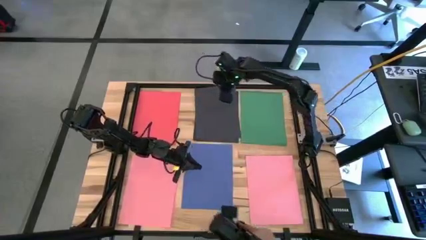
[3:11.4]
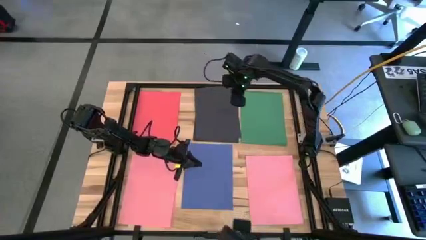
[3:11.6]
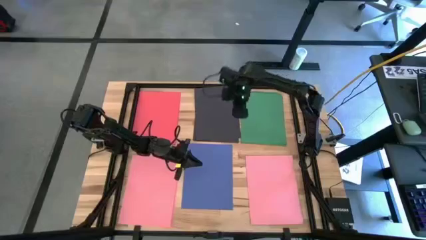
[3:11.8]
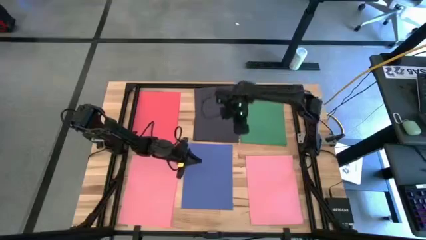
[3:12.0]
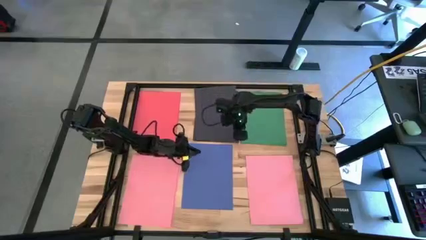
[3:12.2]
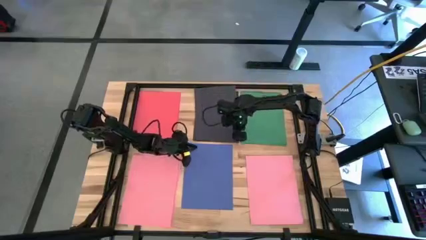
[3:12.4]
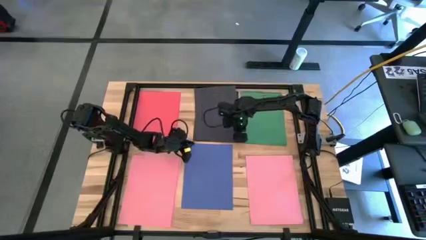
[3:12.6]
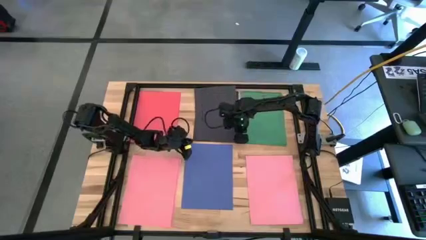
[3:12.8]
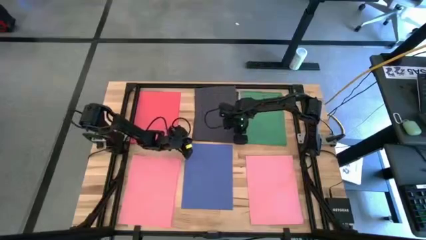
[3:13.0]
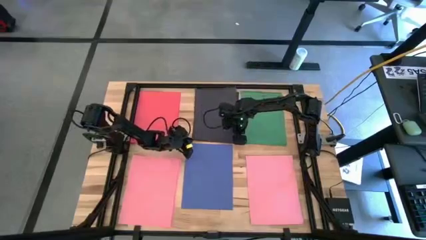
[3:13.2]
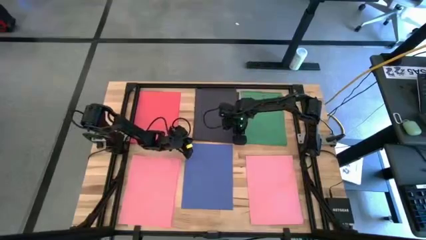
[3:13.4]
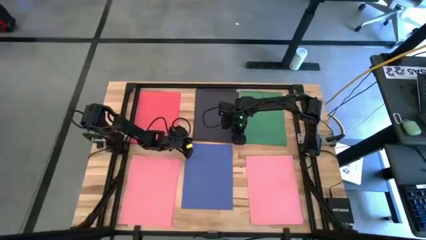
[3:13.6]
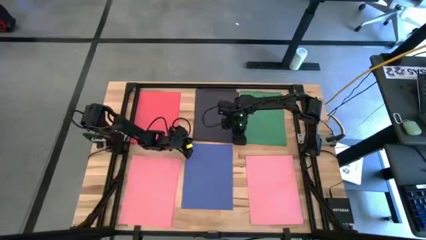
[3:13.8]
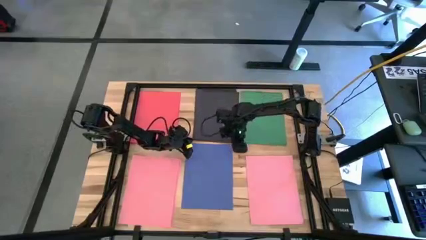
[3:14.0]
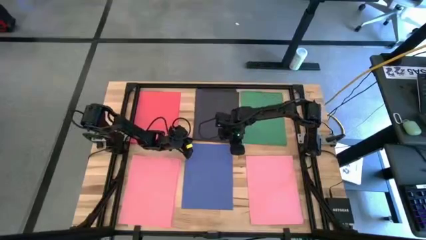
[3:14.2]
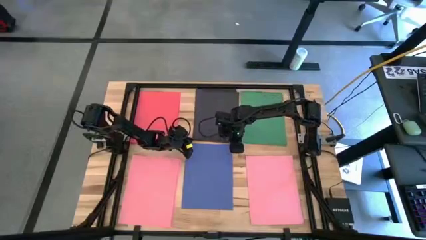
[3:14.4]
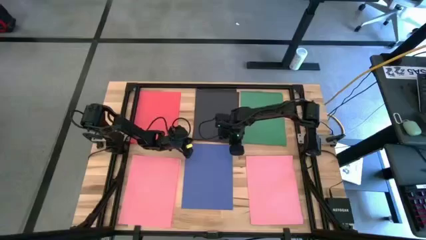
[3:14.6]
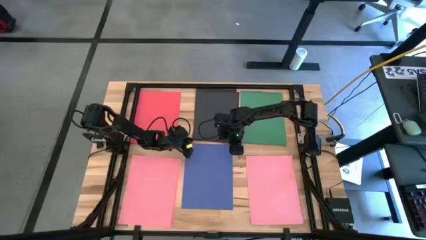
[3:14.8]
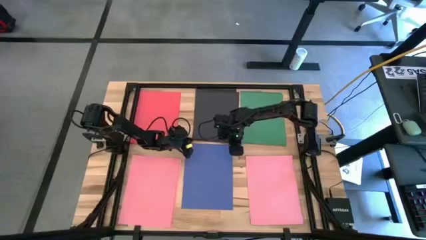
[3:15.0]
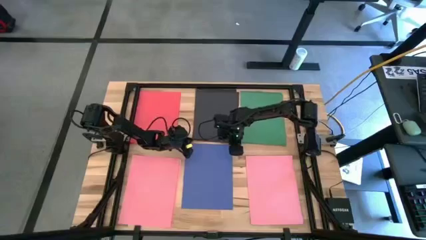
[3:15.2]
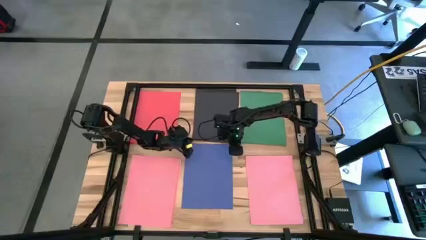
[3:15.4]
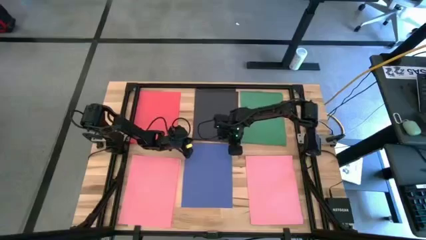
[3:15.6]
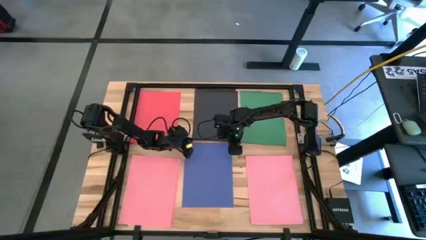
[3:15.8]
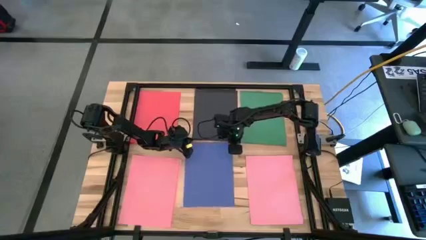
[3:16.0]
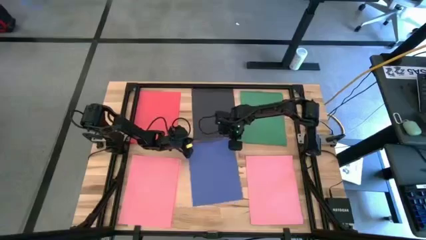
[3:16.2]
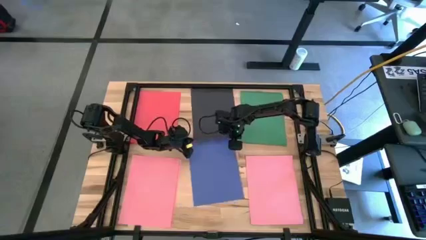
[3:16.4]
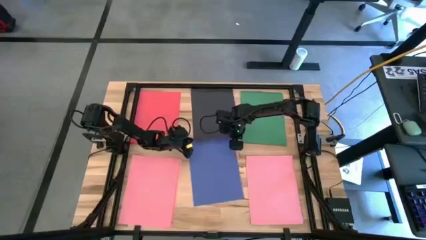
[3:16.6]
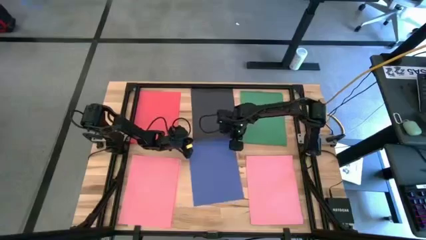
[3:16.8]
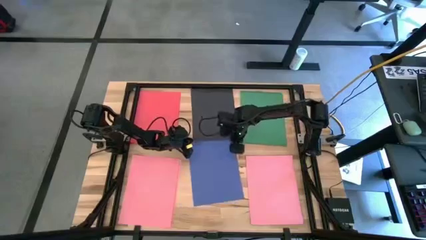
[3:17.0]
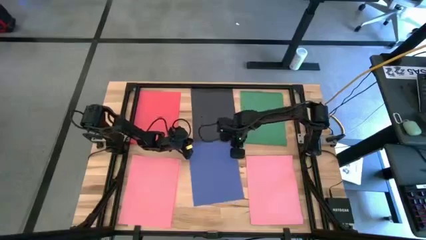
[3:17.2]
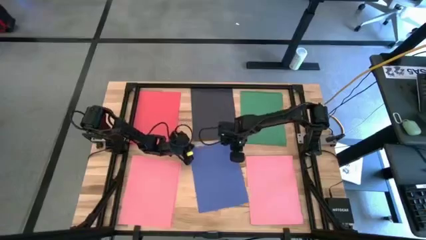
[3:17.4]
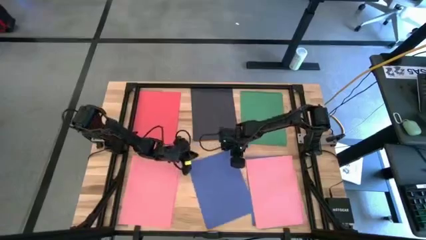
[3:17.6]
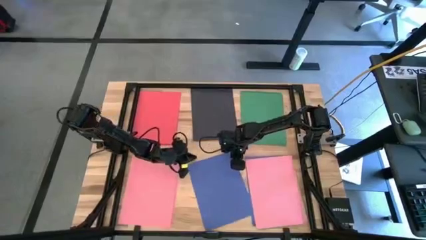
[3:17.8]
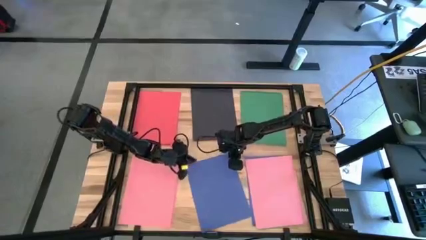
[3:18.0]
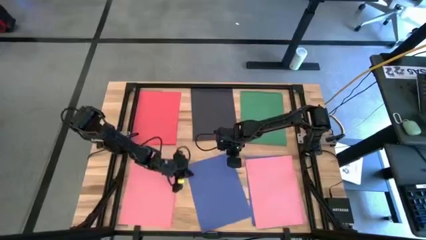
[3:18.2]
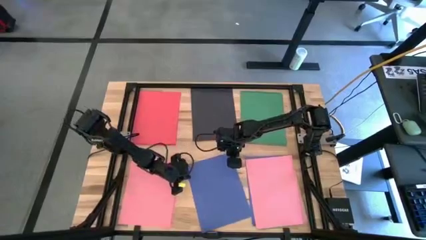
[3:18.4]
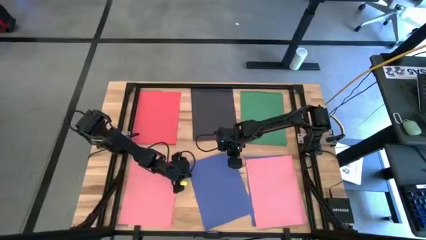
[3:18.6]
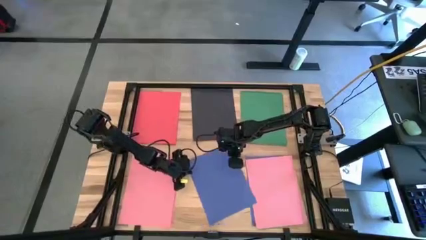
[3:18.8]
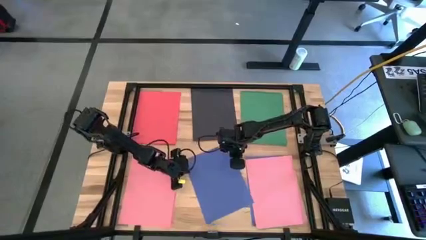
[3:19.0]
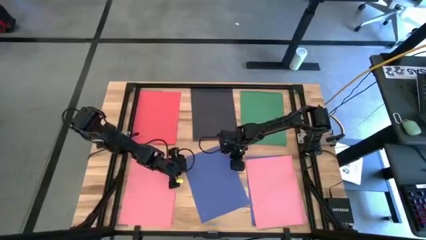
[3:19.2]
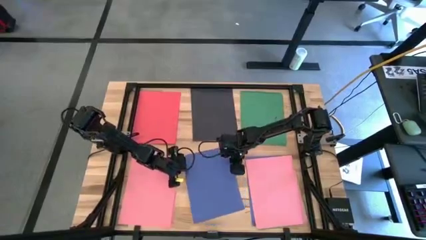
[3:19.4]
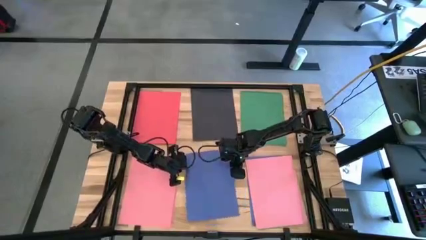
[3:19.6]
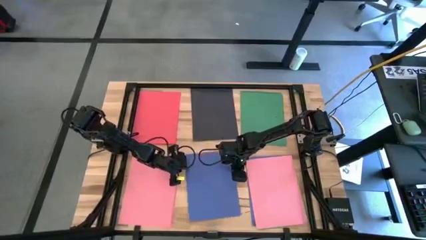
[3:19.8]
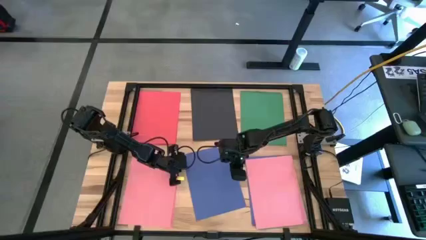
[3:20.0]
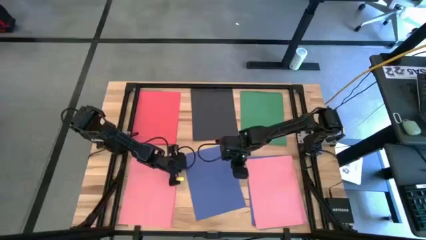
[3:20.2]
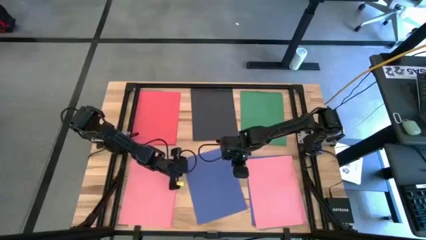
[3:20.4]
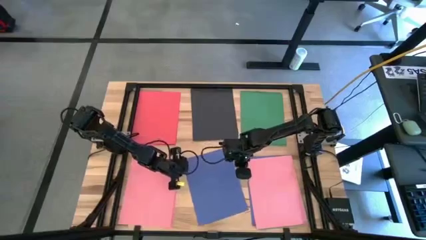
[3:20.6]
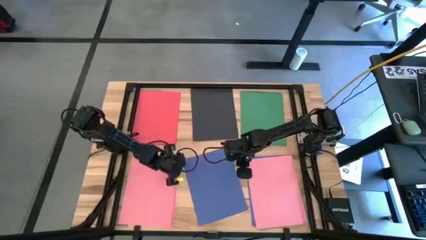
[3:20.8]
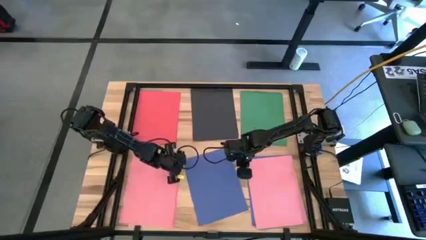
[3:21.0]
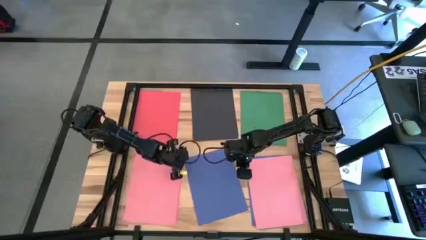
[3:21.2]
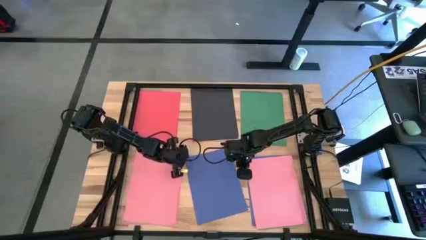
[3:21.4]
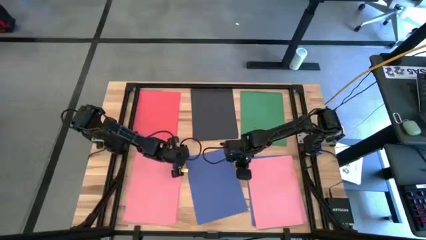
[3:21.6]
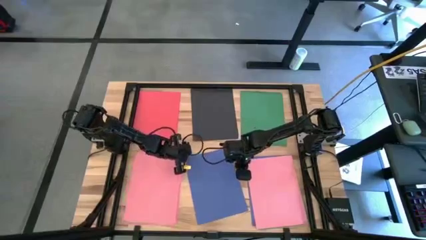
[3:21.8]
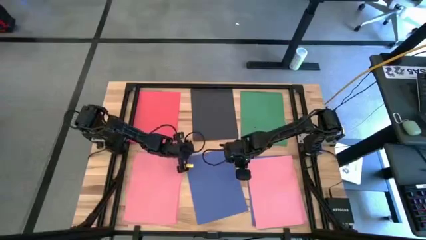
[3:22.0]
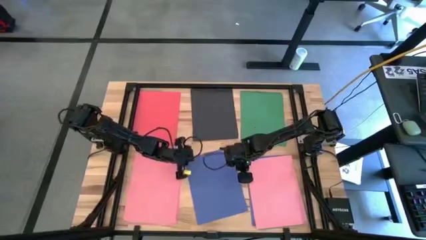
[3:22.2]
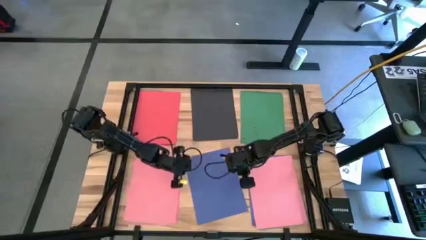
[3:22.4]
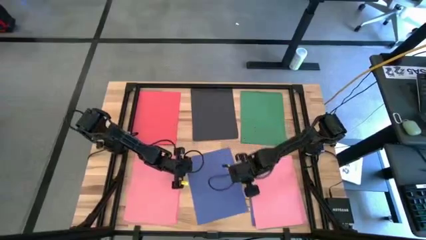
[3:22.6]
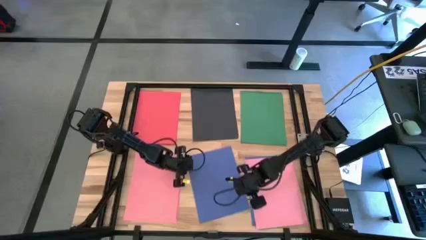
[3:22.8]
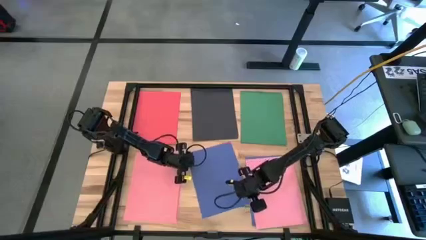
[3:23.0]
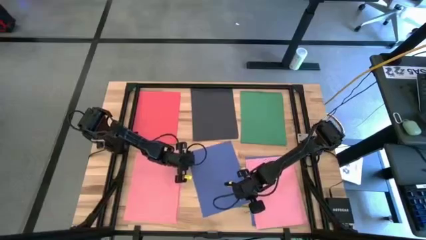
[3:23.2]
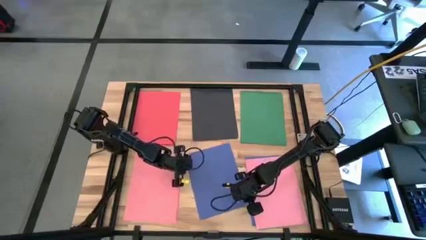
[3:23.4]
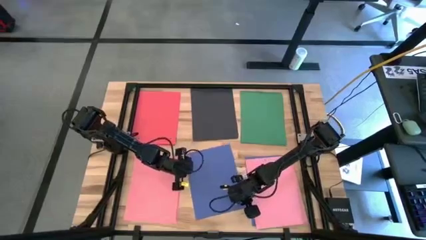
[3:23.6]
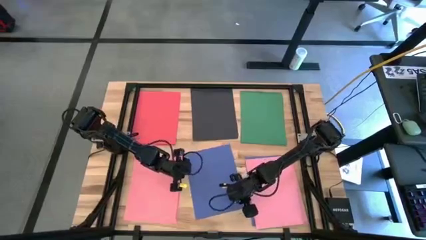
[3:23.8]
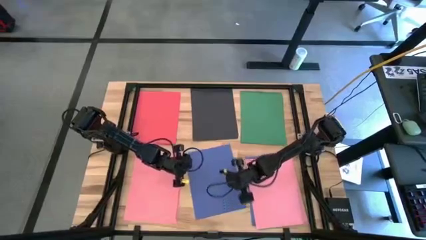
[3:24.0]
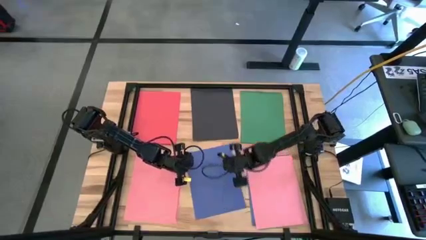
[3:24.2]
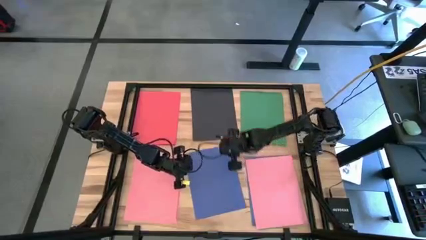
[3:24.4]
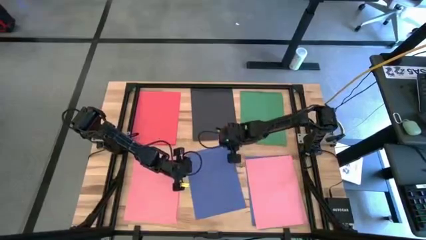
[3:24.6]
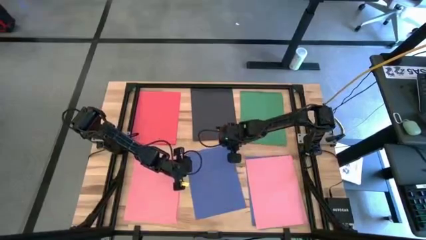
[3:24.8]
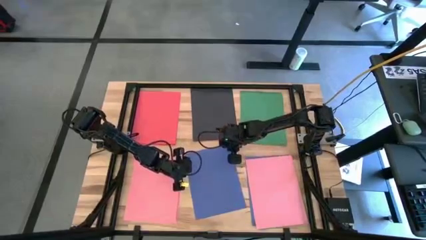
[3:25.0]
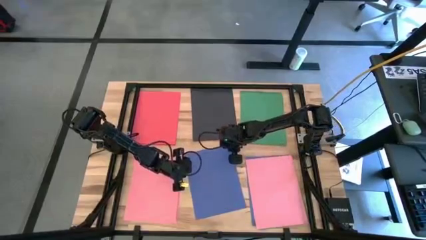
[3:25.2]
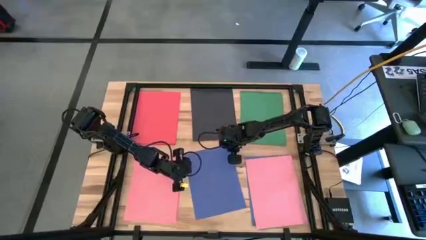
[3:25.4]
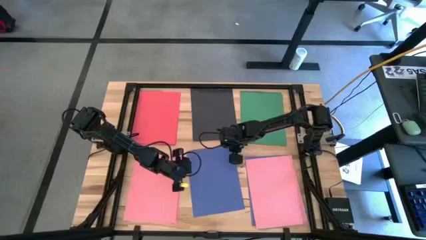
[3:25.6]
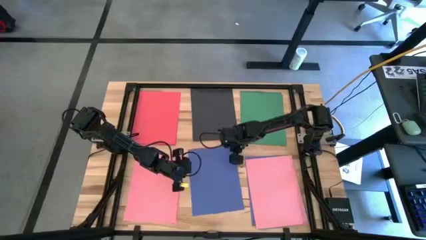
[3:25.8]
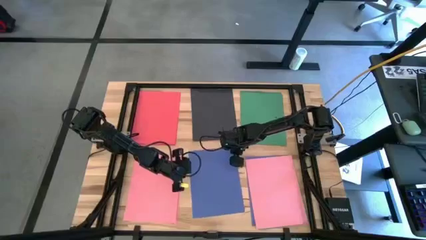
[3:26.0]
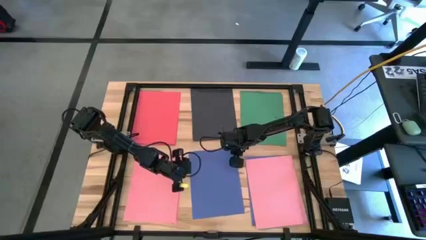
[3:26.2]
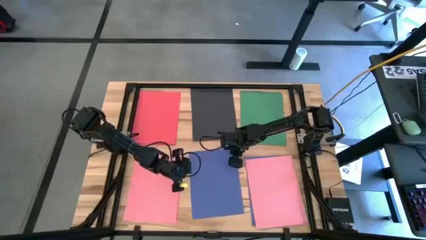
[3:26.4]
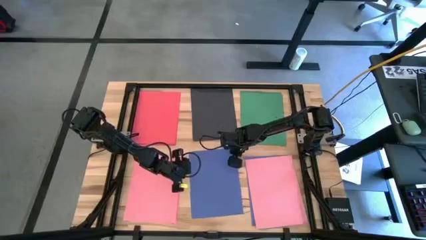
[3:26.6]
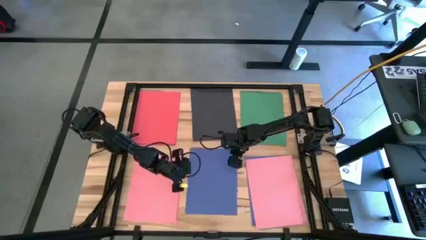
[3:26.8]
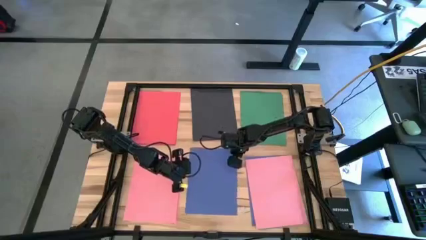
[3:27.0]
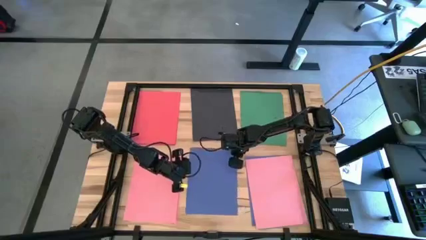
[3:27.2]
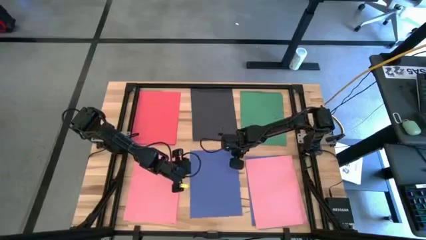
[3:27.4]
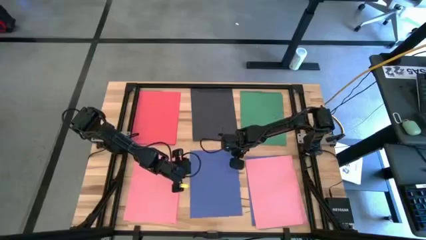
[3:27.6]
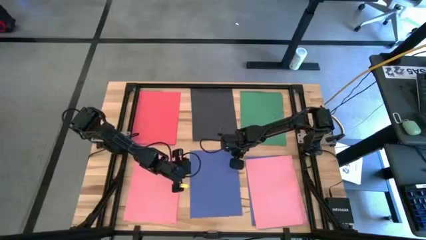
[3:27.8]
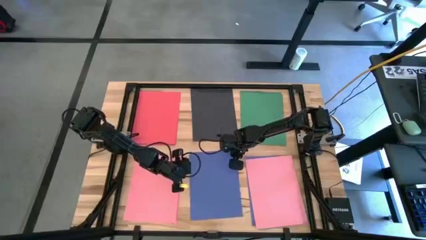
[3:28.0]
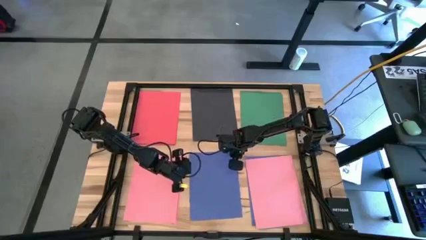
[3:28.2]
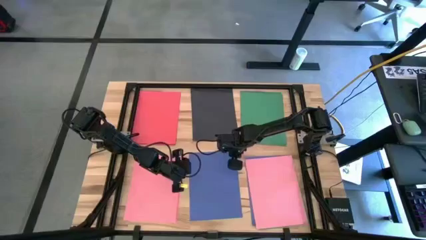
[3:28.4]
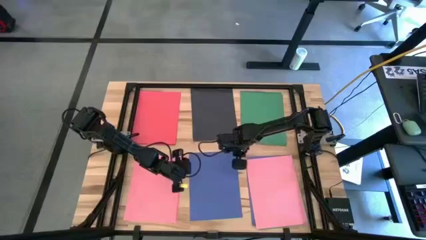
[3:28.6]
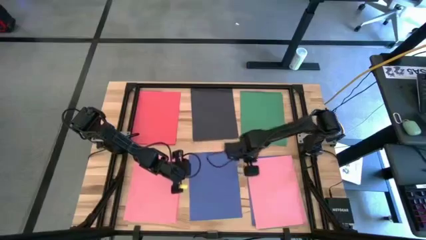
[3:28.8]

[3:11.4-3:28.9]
Task: Organize paper
Adjust the blue paper
